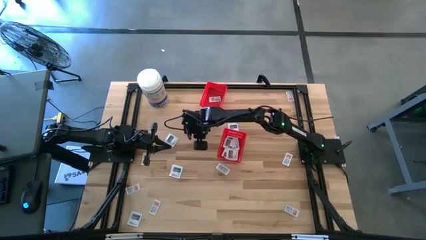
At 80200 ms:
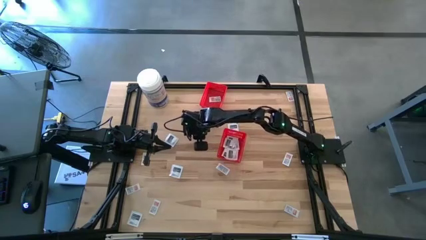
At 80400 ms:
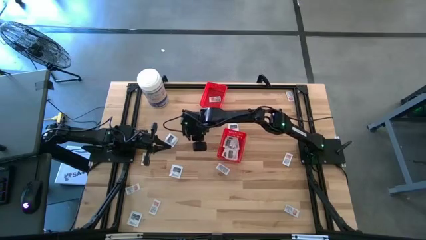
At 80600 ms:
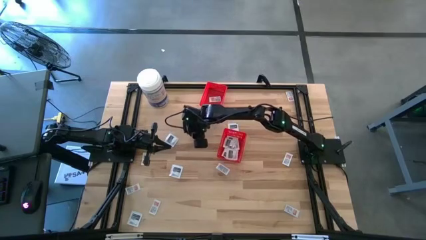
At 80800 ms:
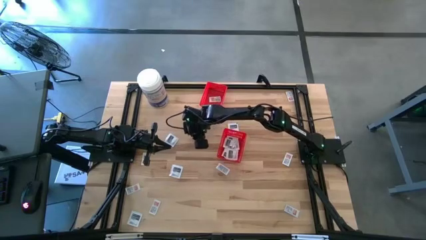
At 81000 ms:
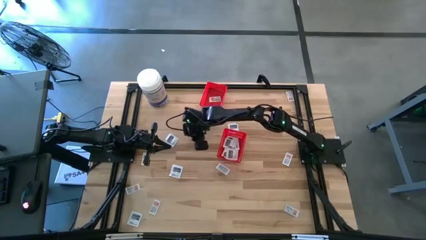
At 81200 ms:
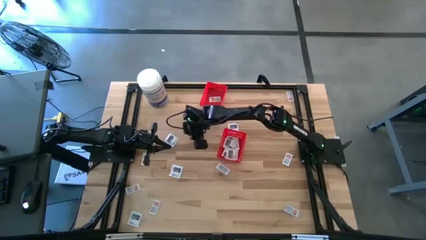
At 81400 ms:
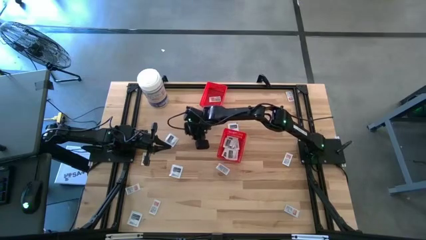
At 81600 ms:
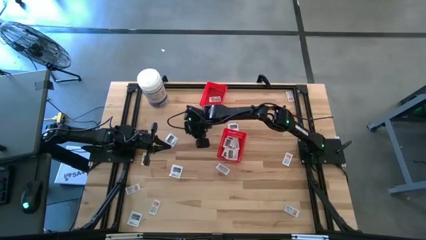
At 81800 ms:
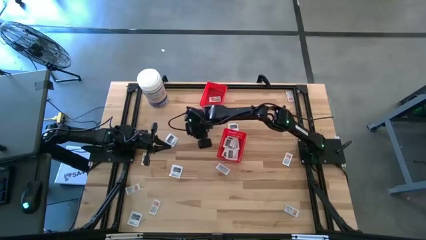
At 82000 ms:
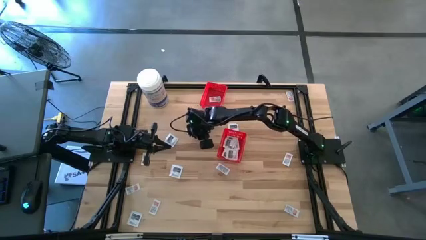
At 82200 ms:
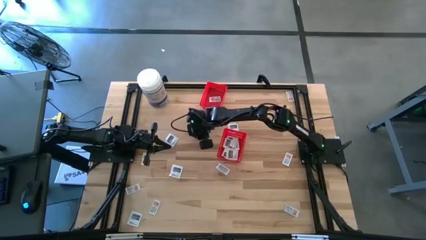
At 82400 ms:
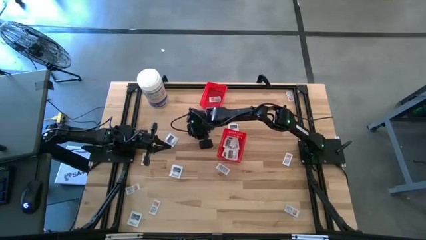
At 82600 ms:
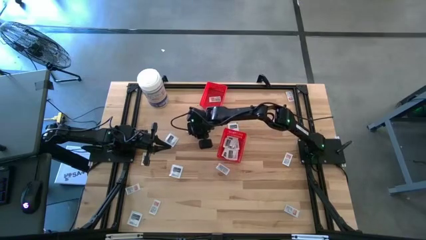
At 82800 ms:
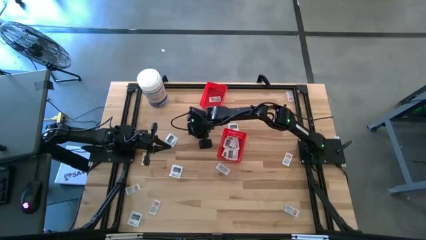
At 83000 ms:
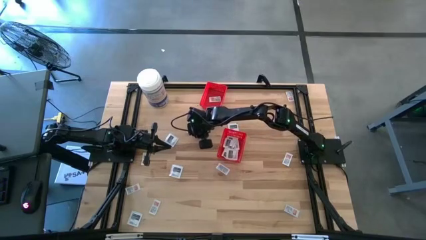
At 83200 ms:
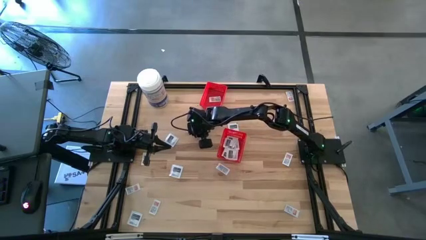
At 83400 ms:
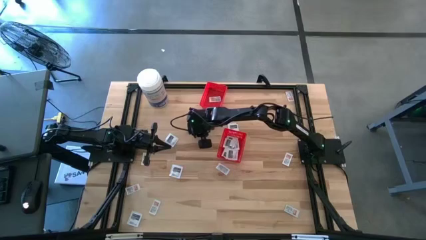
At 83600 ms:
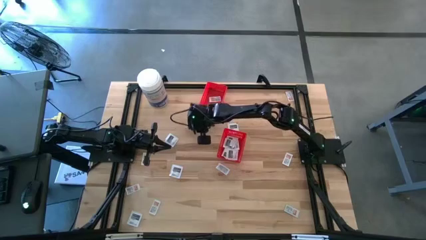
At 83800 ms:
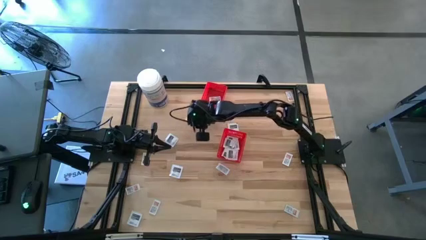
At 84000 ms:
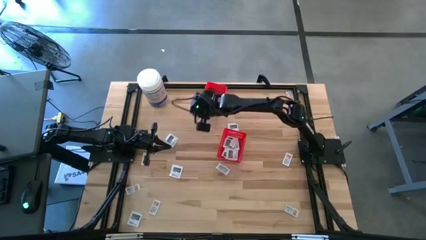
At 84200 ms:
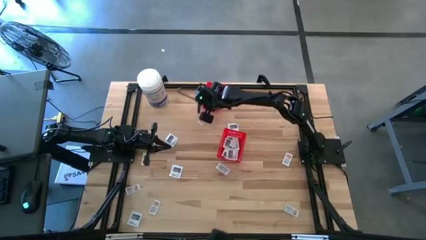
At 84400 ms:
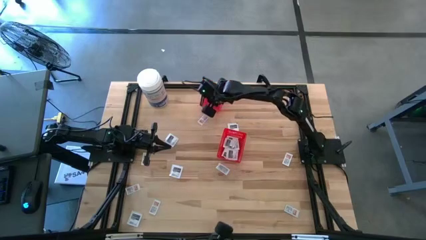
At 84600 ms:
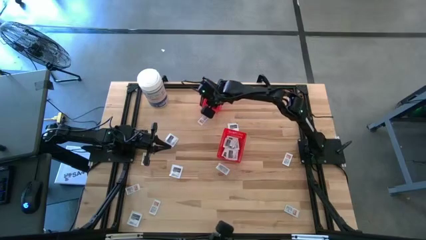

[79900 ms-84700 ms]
Task: Pick & Place First Aid Supplies
Put the white ointment pack into the top red bin

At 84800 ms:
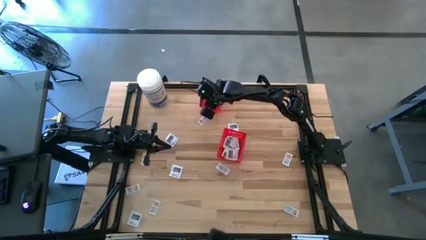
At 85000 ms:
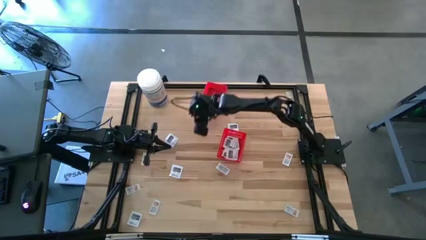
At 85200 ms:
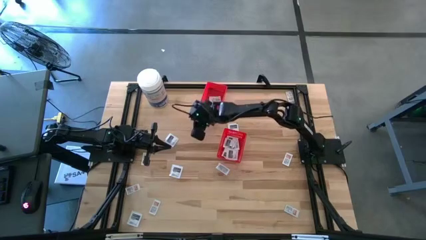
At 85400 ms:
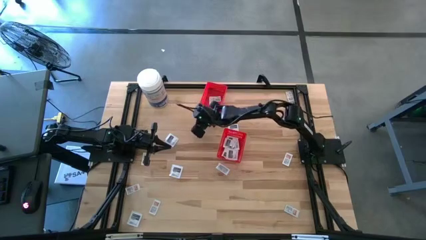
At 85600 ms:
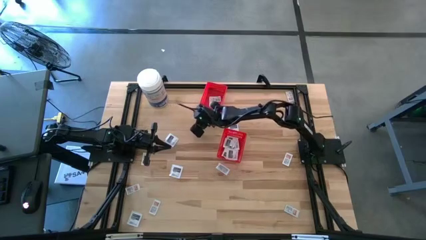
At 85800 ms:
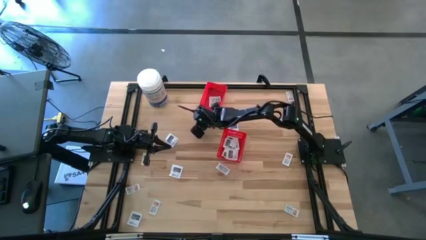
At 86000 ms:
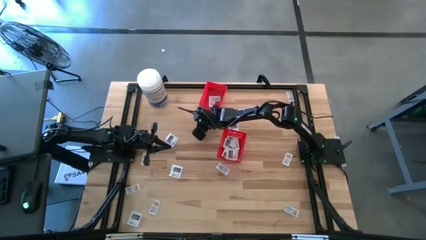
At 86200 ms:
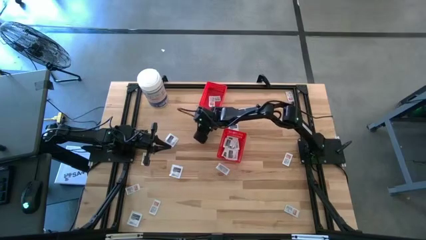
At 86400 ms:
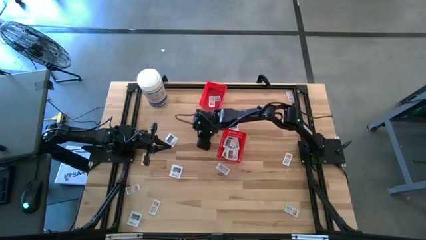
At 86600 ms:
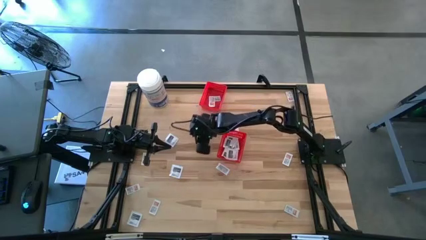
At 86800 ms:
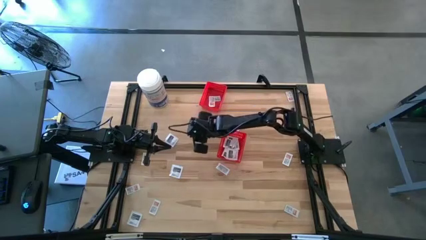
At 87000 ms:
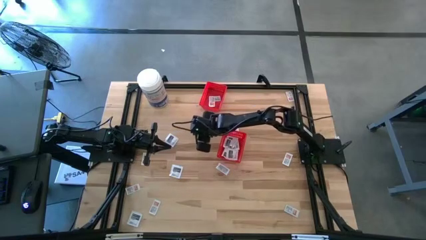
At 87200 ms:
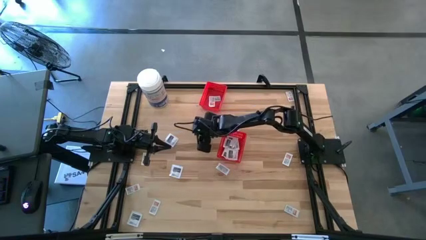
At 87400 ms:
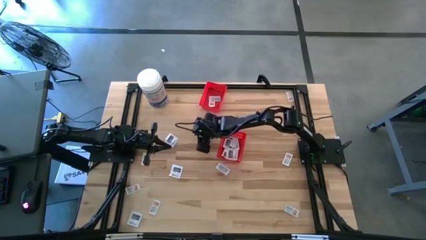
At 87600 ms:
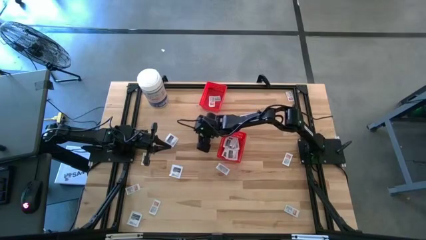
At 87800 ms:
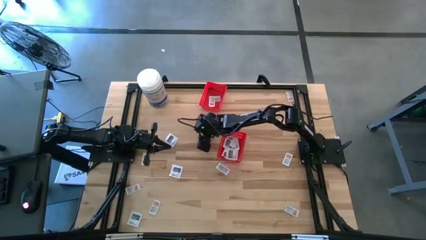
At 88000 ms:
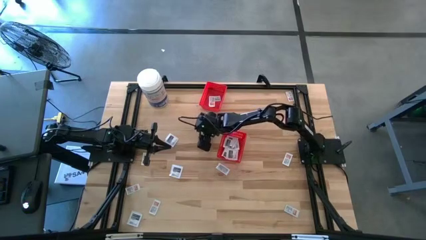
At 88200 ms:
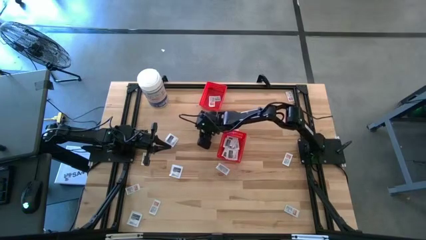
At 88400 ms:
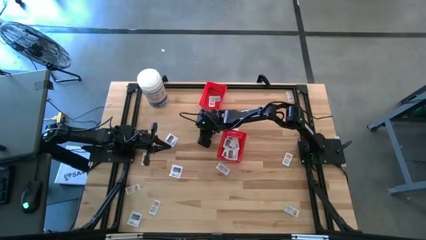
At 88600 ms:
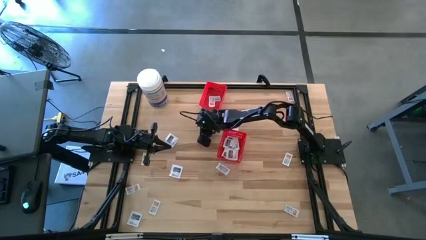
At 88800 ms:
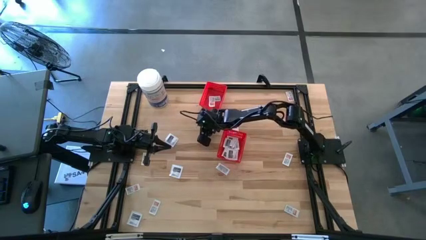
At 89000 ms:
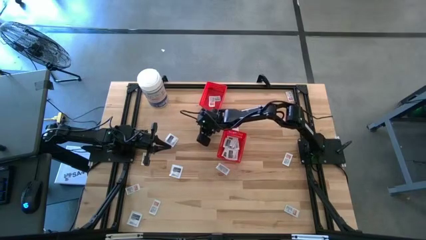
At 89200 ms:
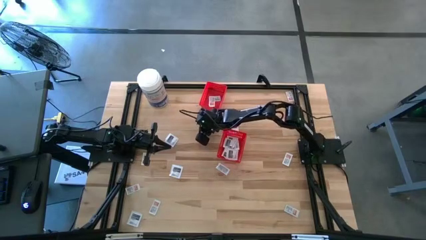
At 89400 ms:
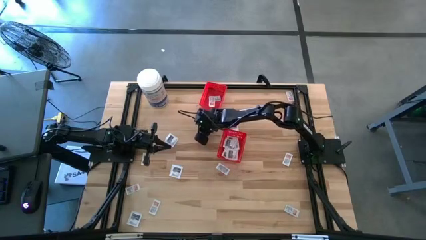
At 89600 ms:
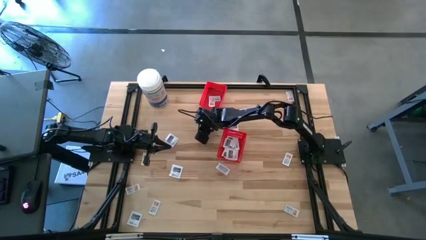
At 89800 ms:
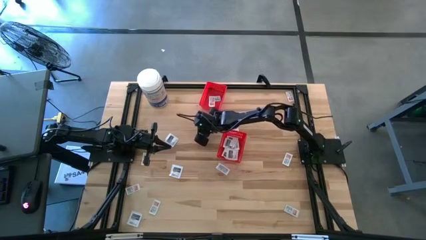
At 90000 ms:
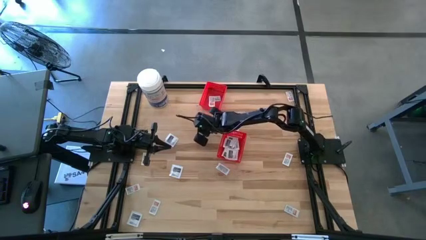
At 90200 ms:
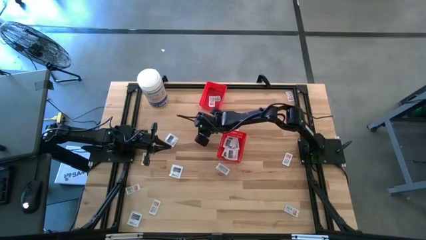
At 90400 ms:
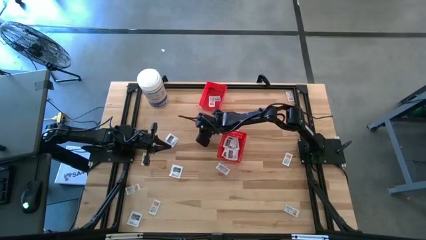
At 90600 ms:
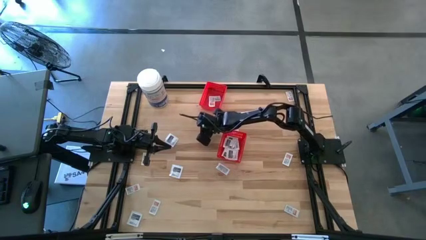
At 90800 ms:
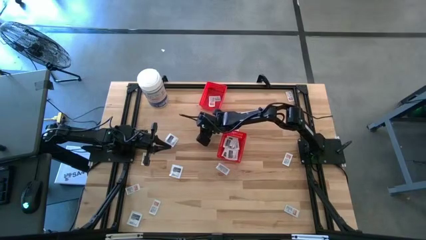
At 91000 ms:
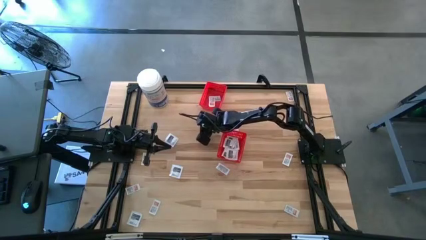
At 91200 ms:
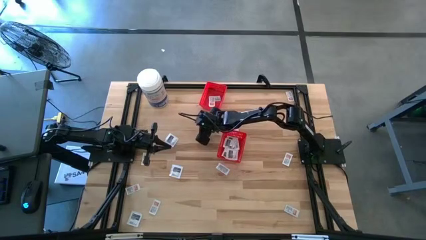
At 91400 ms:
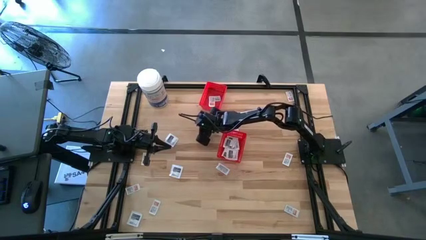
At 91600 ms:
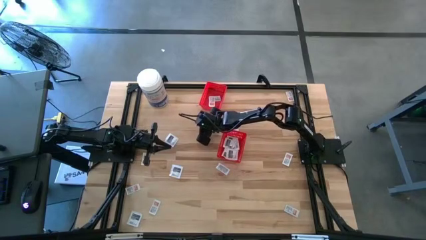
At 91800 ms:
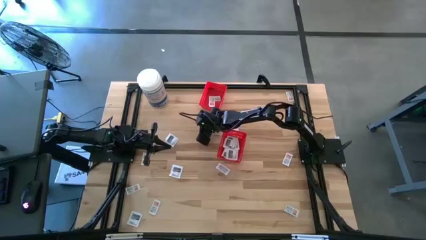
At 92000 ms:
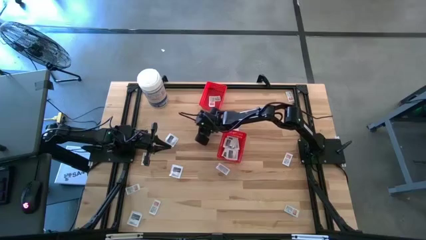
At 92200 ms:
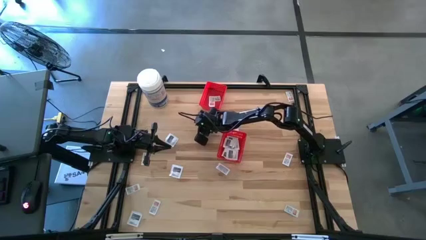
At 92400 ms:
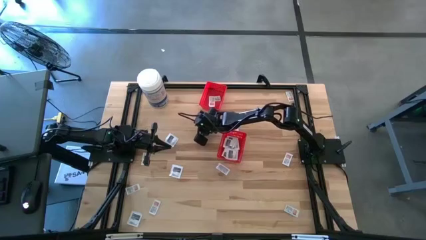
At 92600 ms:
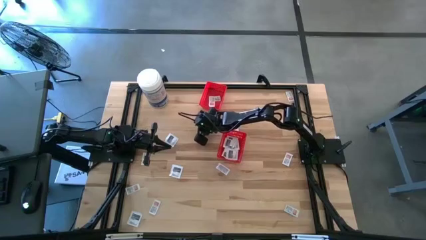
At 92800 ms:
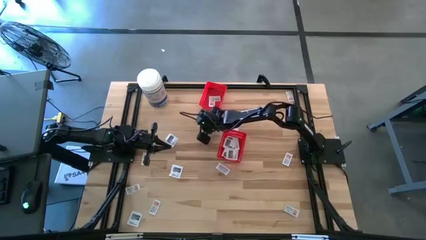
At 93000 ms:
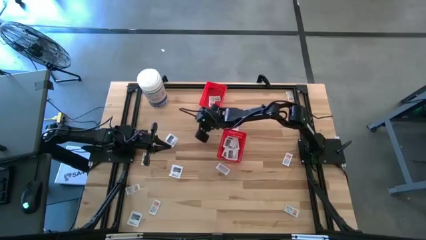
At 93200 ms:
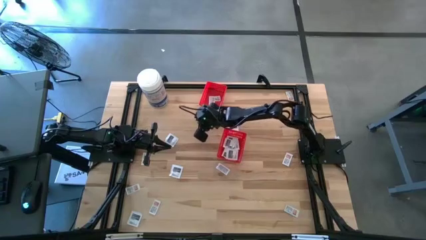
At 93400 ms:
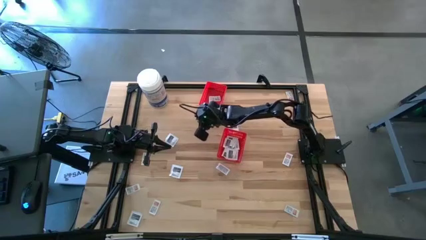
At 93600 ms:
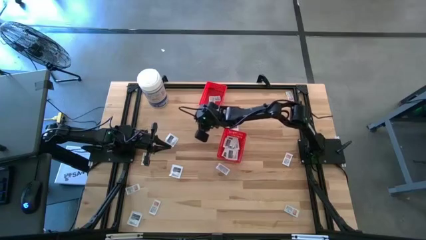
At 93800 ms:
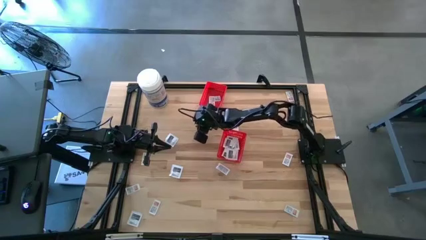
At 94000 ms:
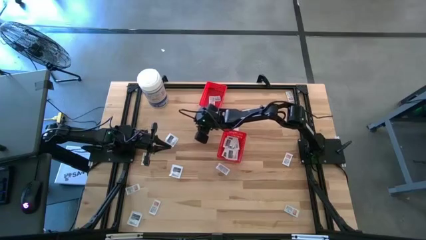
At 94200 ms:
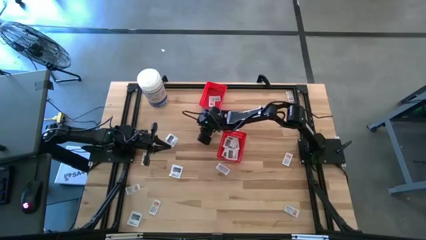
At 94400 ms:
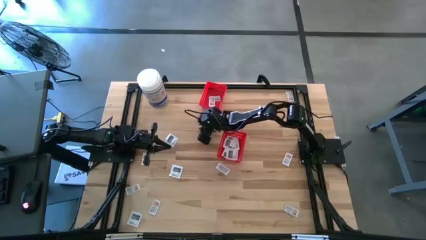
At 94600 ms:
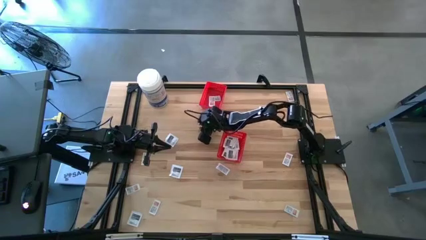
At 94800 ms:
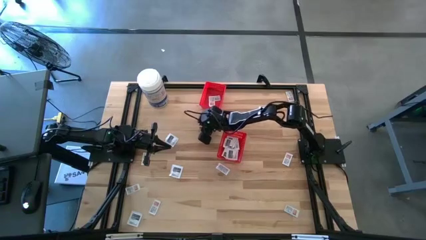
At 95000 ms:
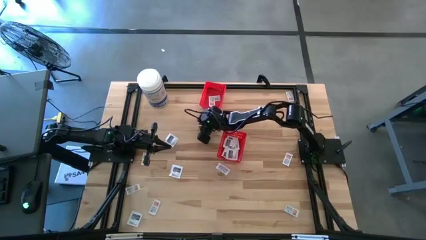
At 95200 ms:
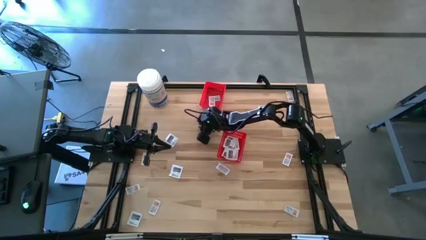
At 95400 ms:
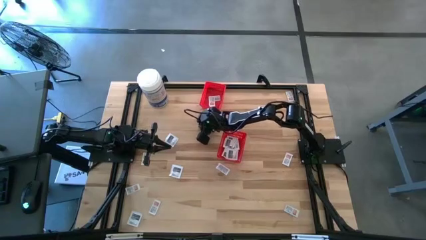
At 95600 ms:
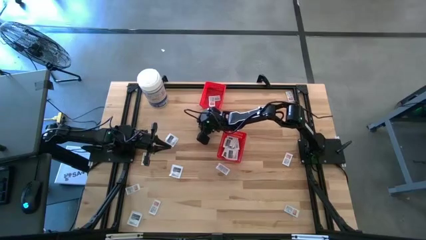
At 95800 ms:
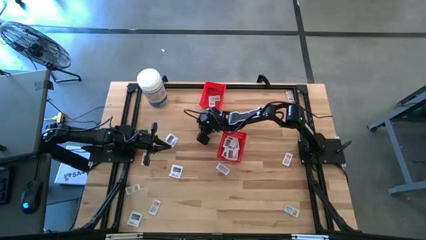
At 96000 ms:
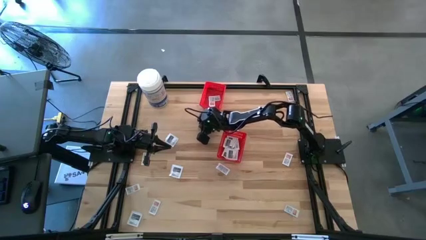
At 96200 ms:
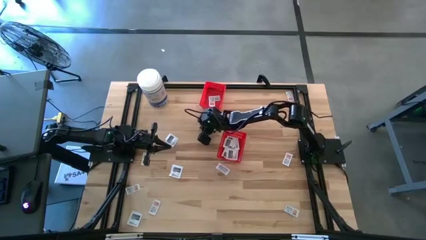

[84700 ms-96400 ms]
Put the white ointment pack into the top red bin
